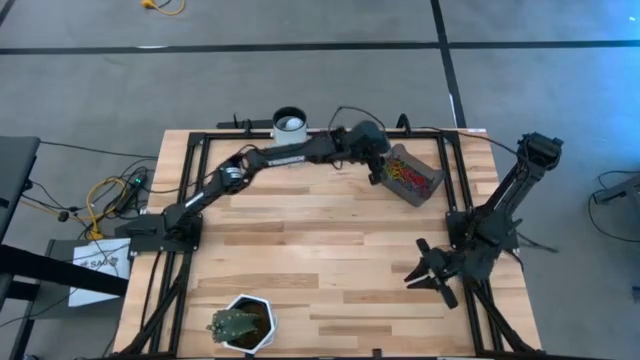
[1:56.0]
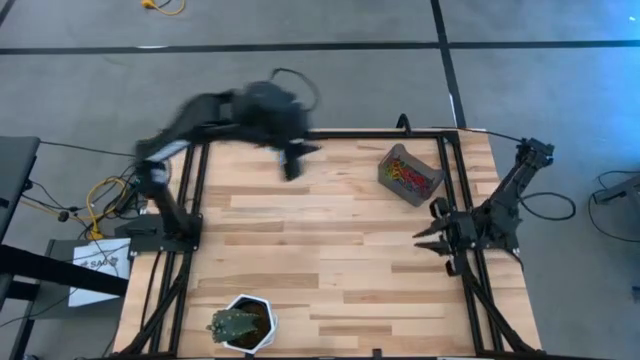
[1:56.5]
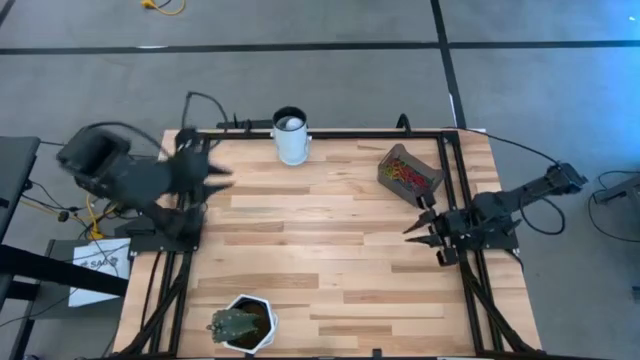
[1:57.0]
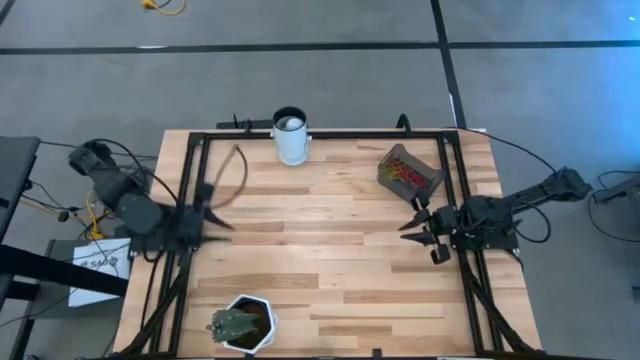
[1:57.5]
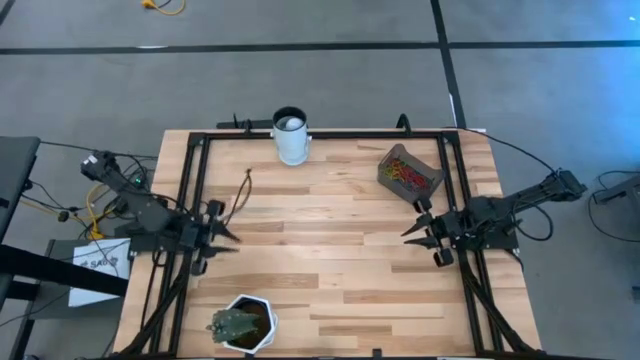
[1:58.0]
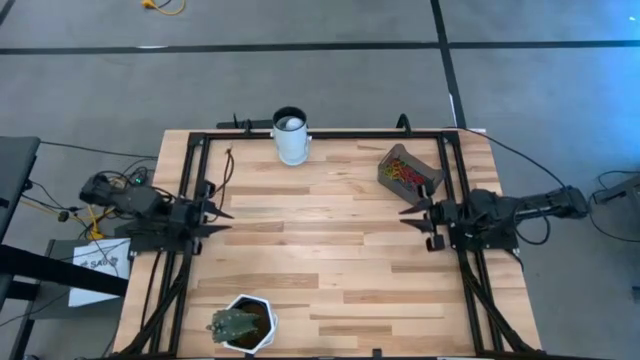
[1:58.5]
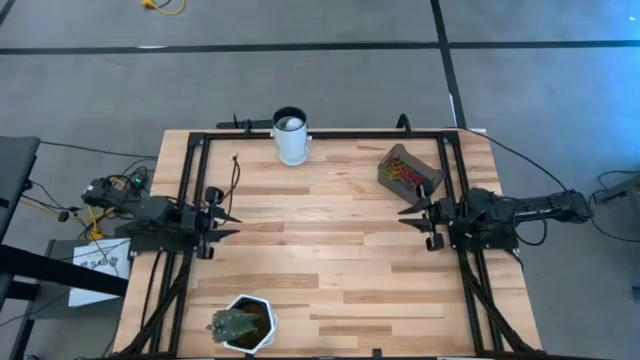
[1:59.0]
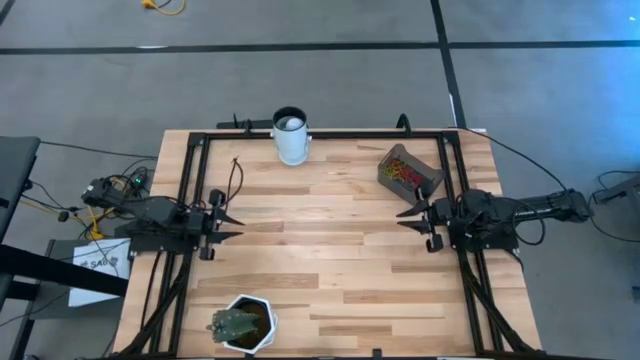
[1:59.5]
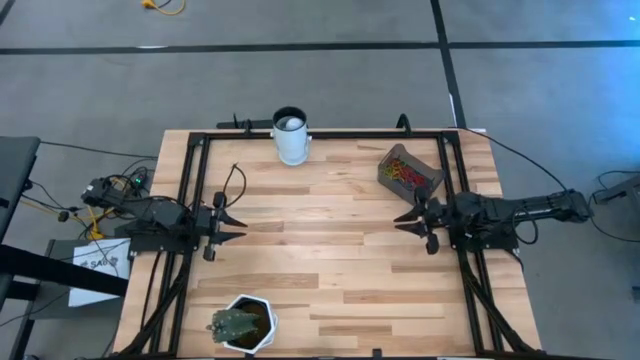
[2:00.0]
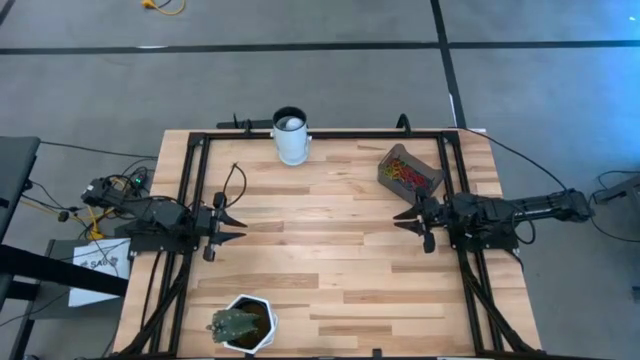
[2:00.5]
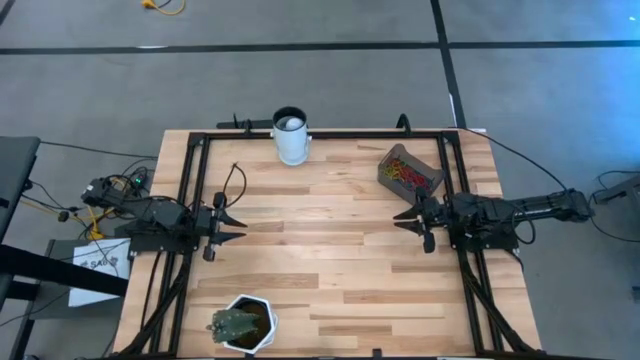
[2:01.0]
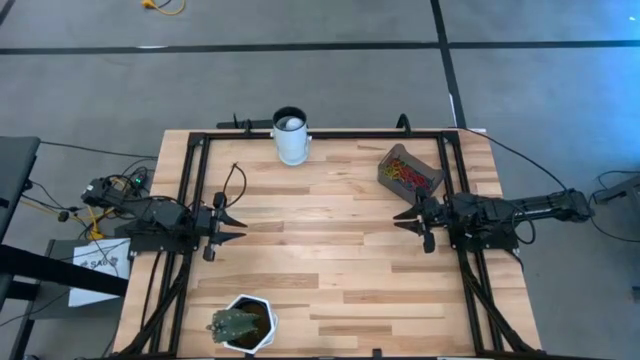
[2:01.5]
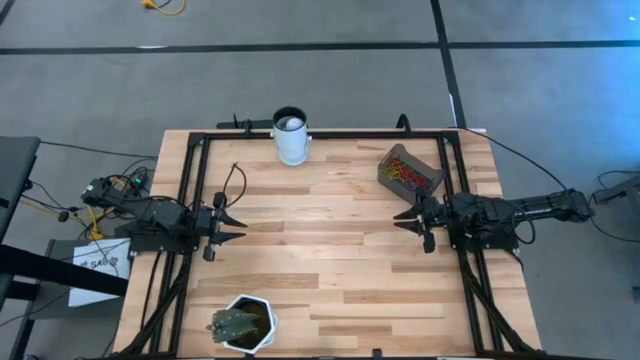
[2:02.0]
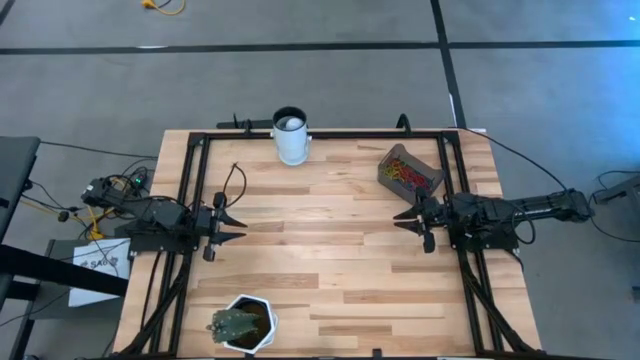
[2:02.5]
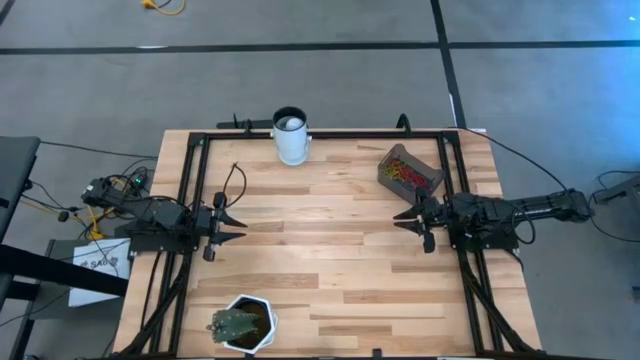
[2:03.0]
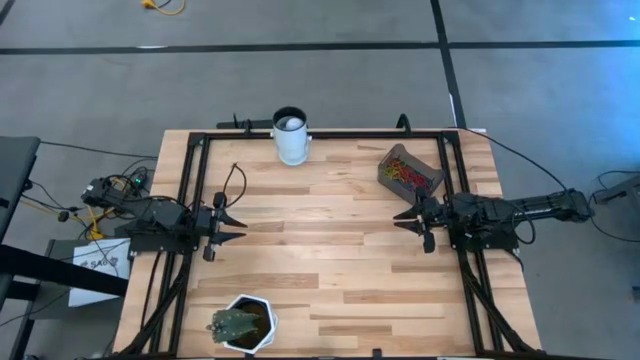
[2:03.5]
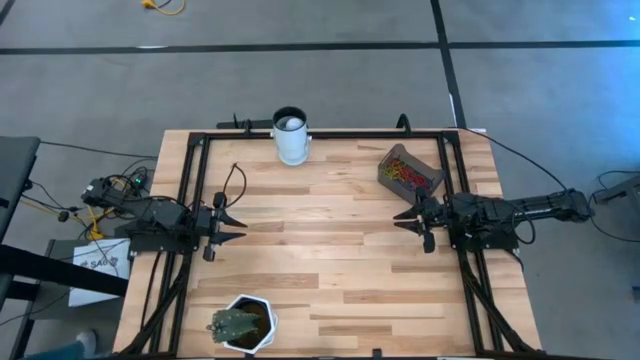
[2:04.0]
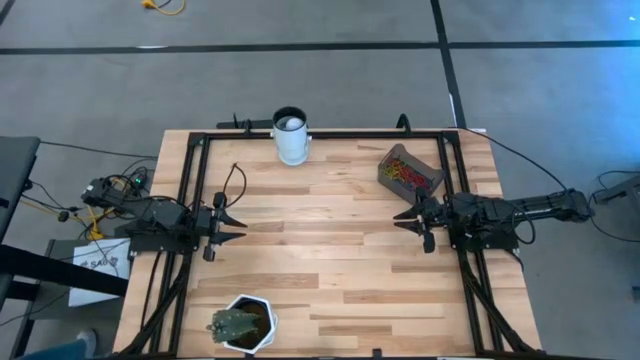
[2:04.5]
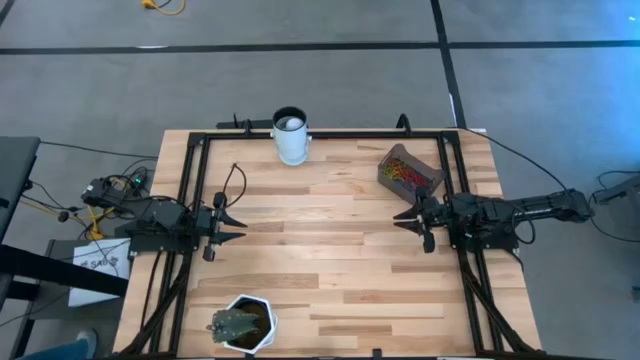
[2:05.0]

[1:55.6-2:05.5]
Task: Pick and place items into bin
Return to Home Position

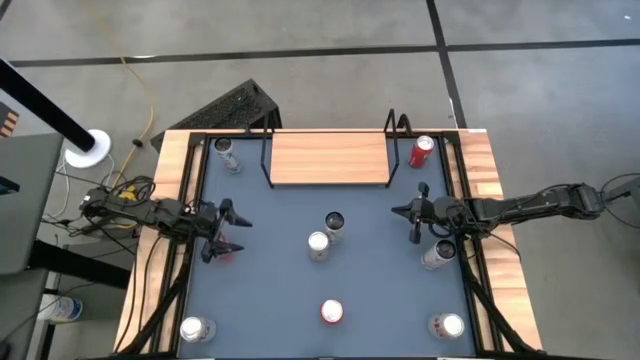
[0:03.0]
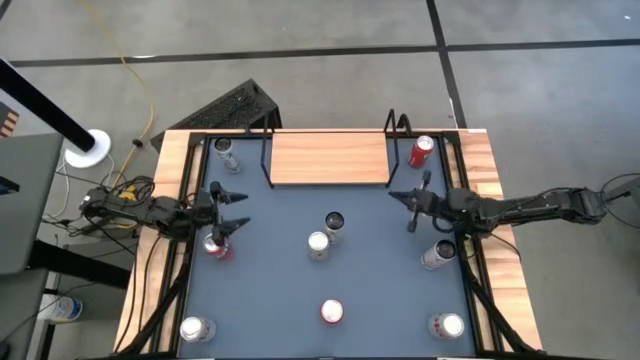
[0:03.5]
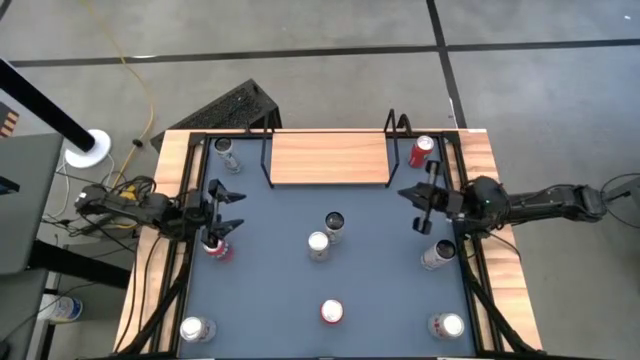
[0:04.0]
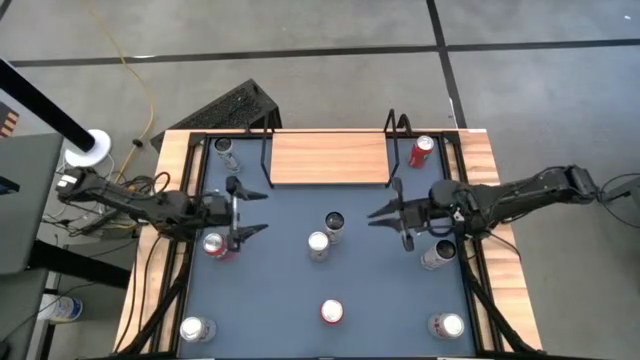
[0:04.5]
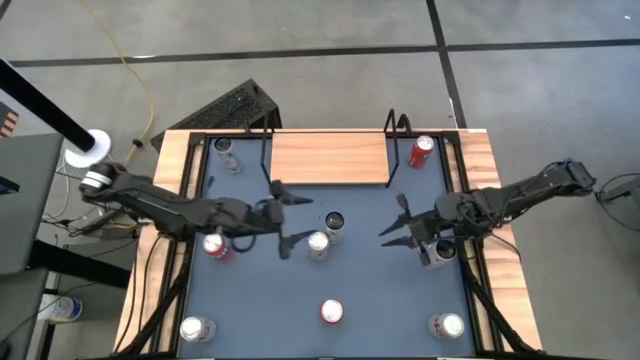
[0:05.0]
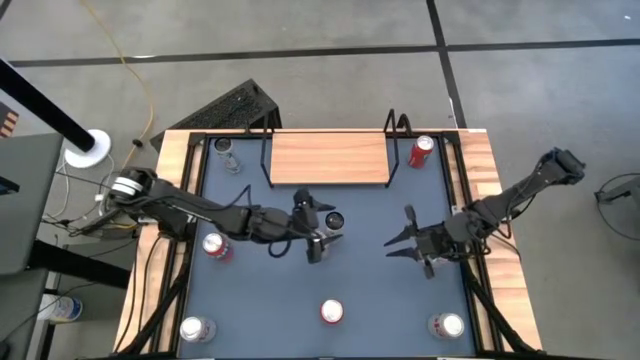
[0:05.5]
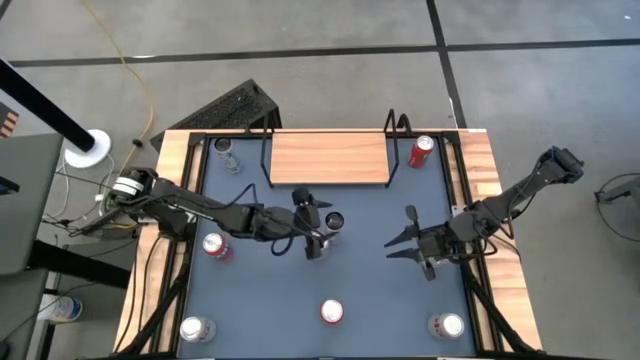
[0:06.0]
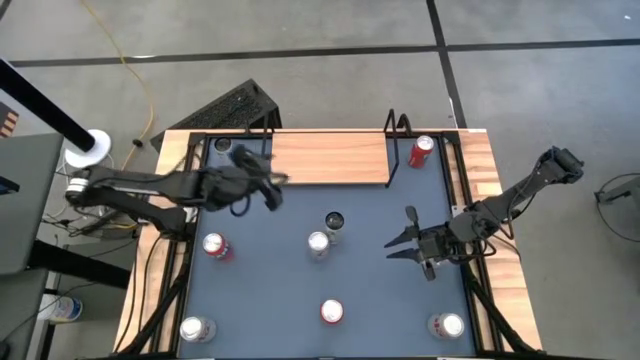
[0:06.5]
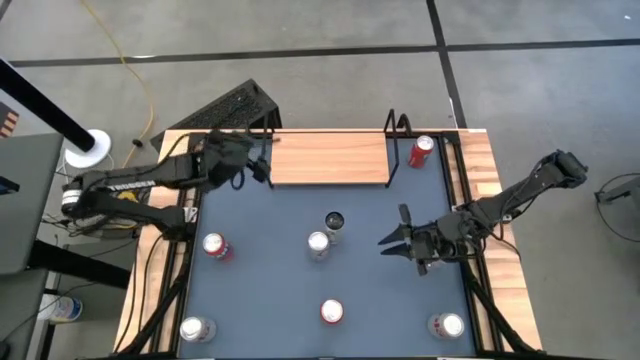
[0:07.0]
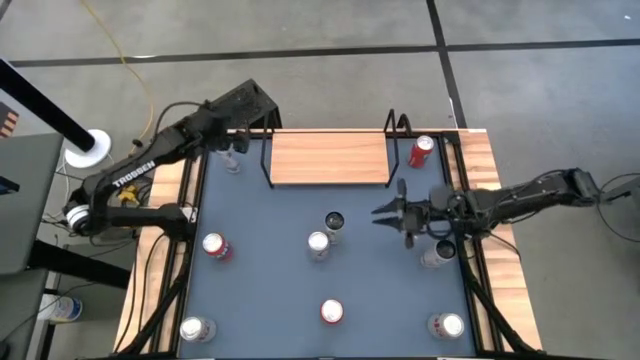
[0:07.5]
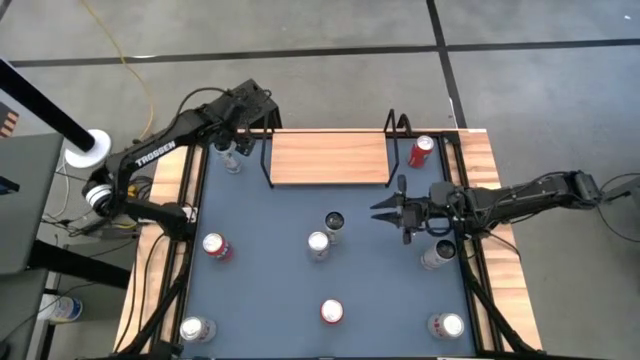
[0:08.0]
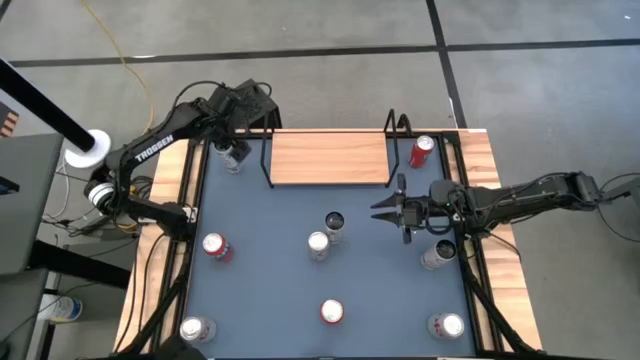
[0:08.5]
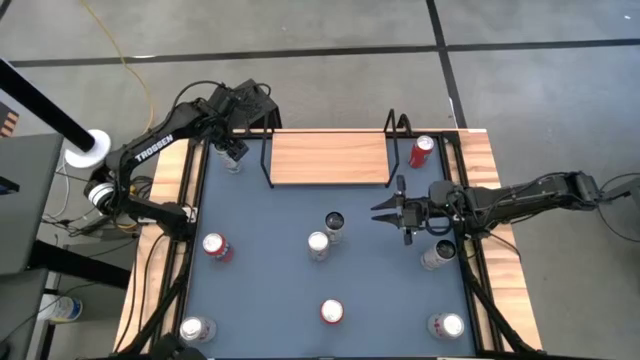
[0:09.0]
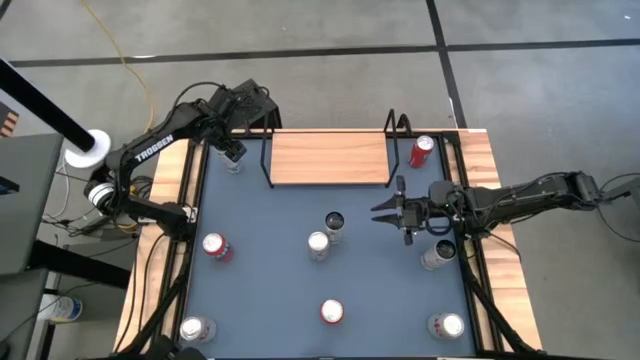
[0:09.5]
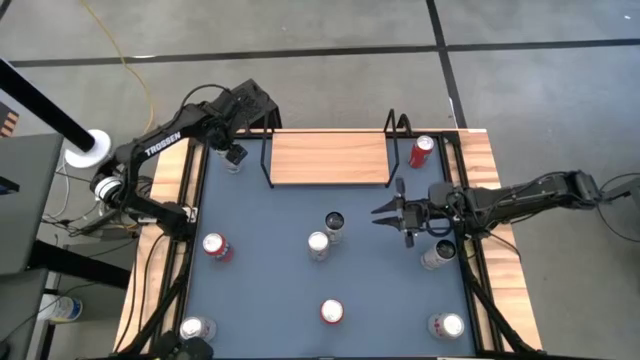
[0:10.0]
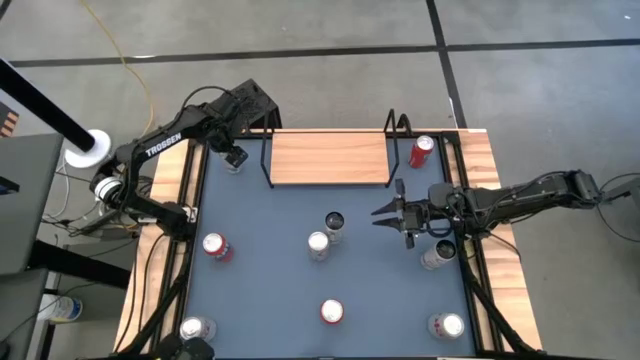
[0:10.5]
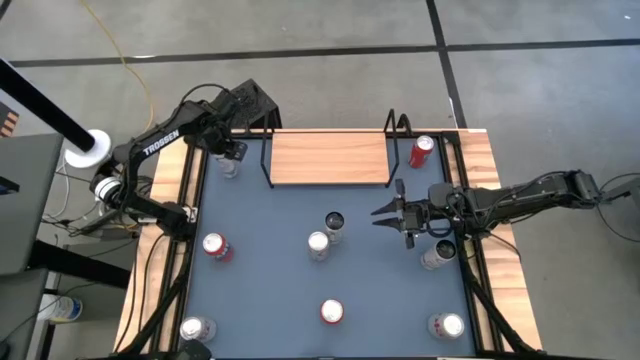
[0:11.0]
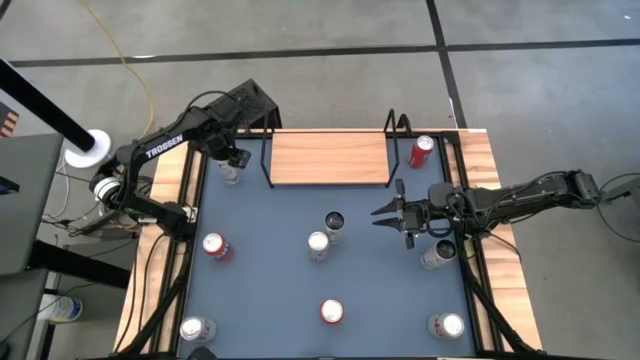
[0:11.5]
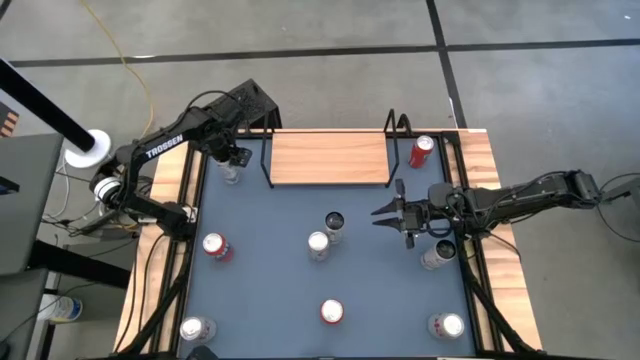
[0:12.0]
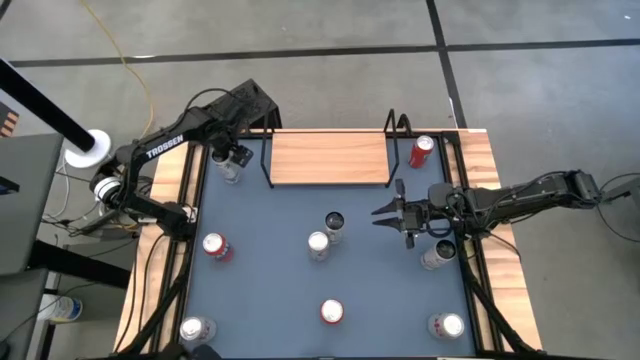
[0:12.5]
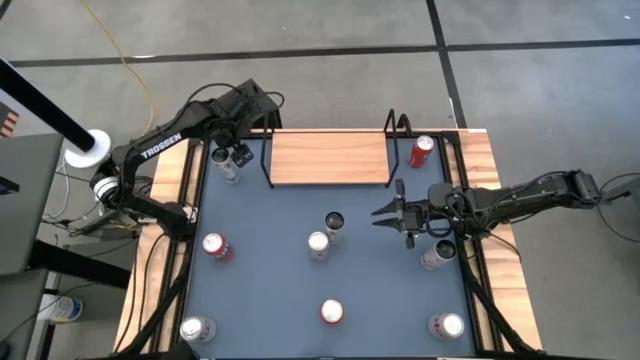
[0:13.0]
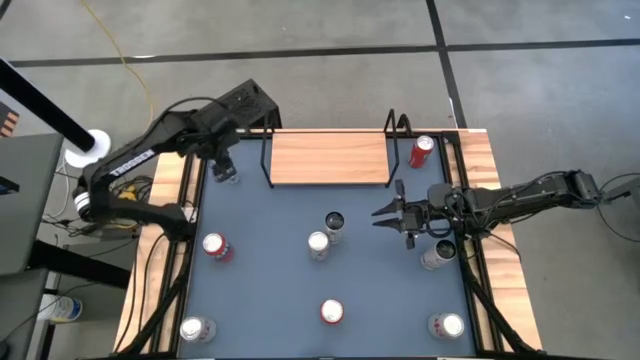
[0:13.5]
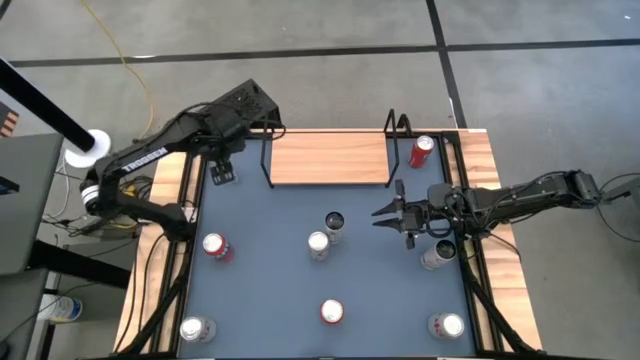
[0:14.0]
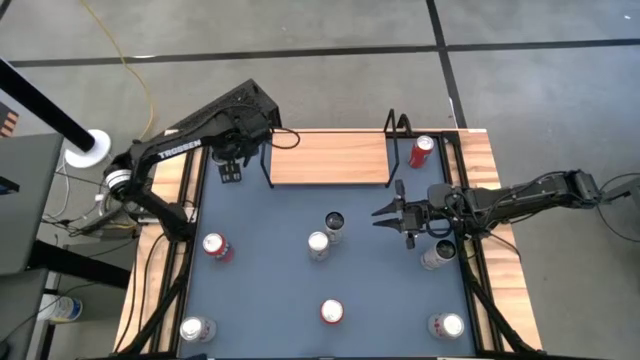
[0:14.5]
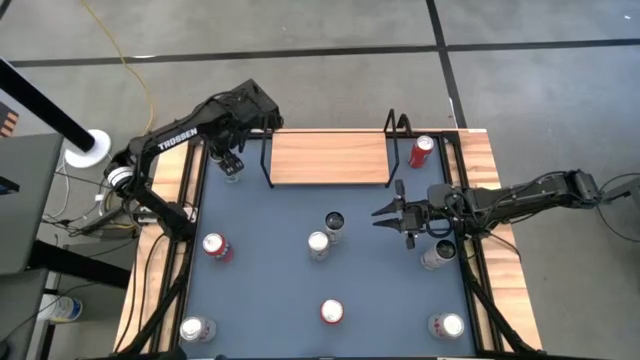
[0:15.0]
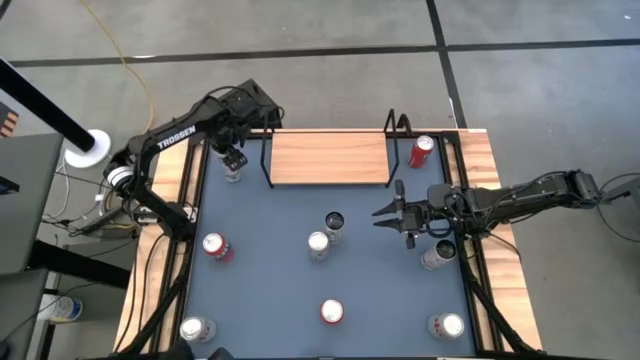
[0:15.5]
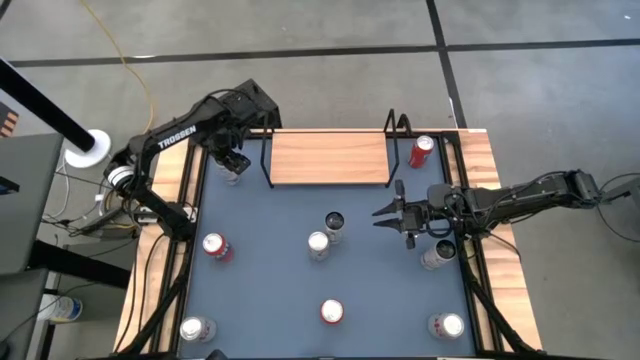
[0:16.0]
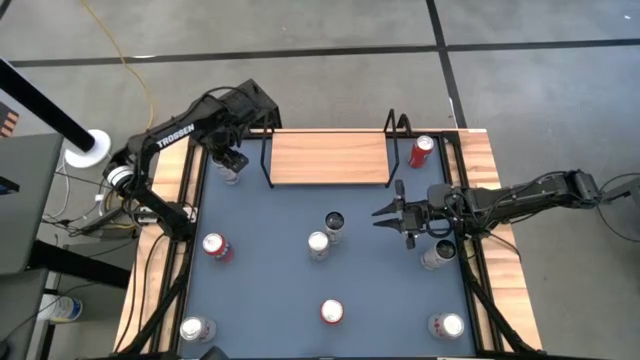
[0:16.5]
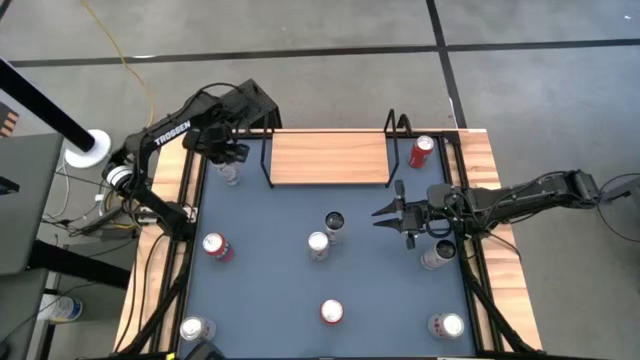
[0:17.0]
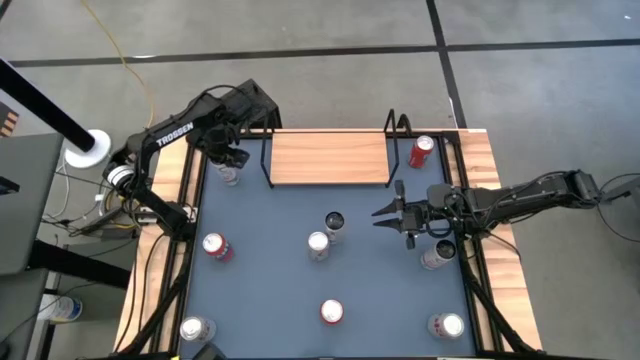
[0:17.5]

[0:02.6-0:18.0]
Task: Place canned beverage on shelf
Put the top white-pink soda can on the shelf
